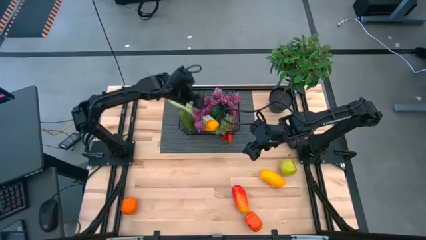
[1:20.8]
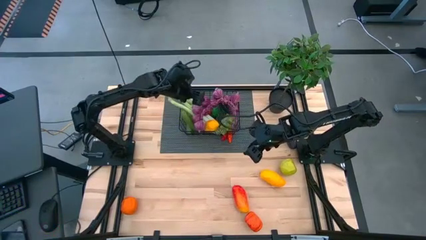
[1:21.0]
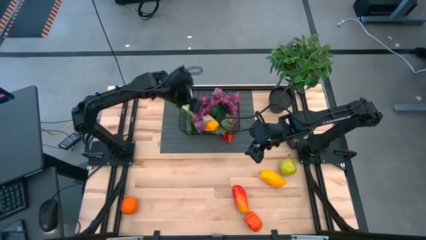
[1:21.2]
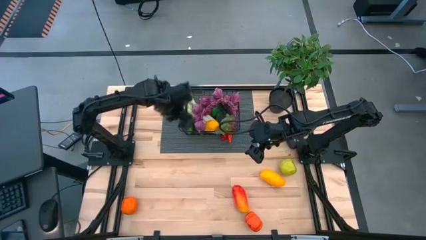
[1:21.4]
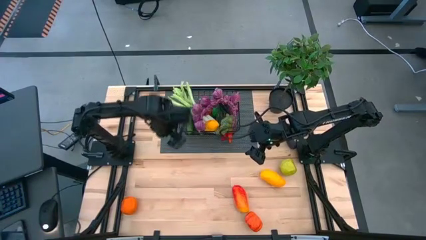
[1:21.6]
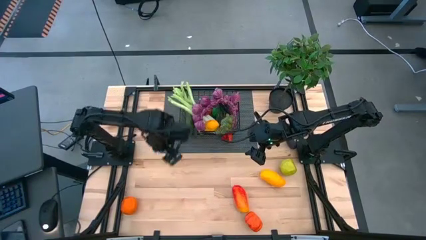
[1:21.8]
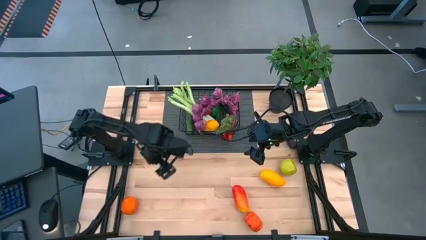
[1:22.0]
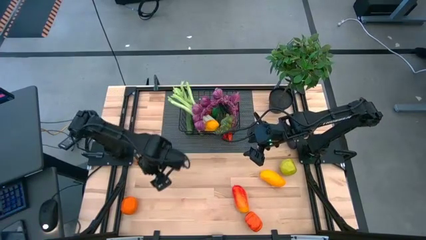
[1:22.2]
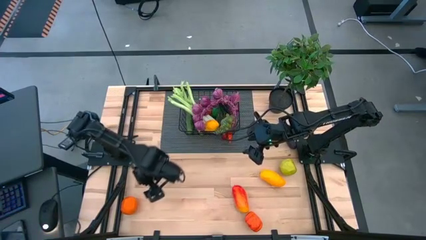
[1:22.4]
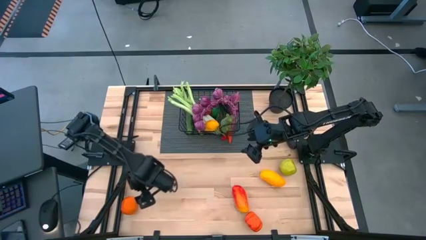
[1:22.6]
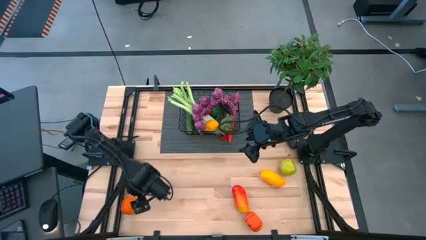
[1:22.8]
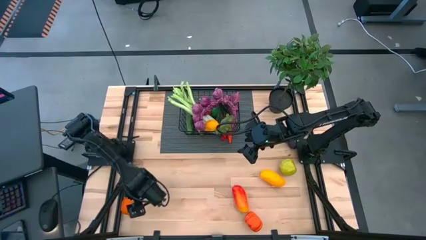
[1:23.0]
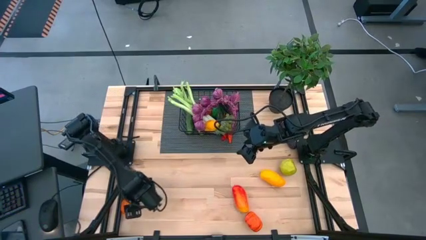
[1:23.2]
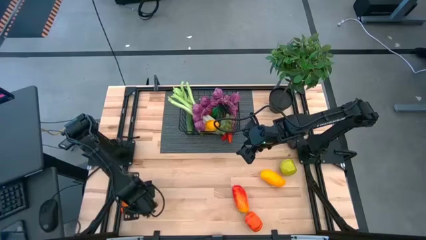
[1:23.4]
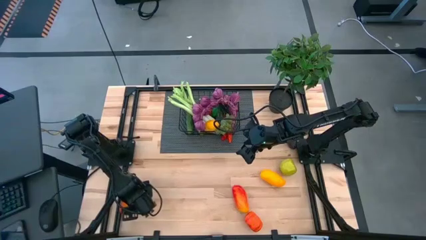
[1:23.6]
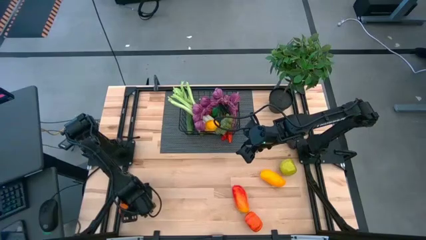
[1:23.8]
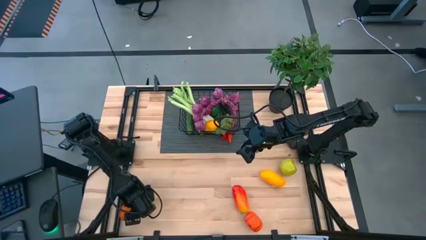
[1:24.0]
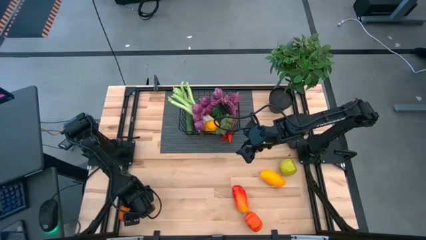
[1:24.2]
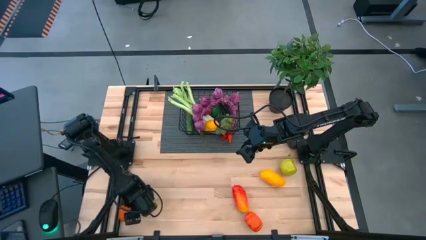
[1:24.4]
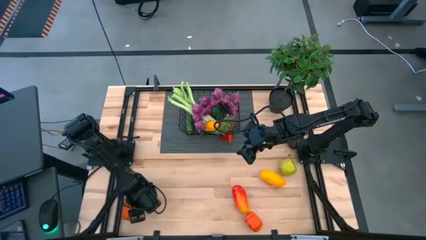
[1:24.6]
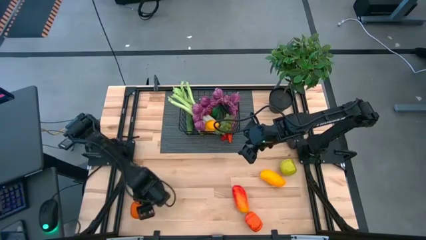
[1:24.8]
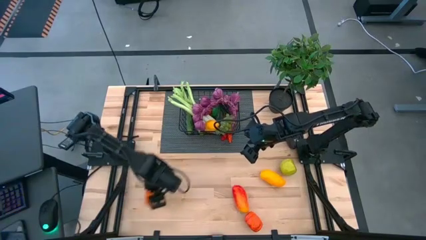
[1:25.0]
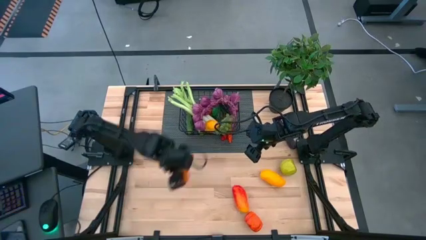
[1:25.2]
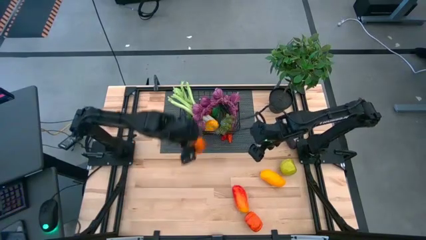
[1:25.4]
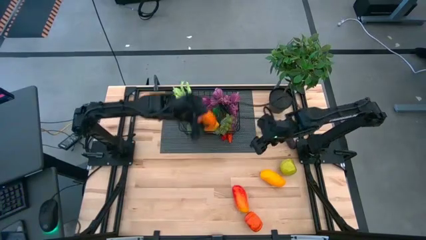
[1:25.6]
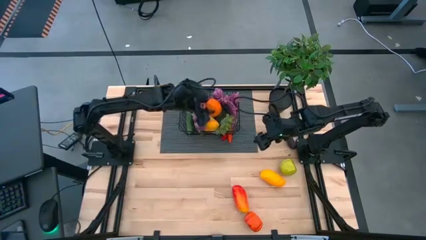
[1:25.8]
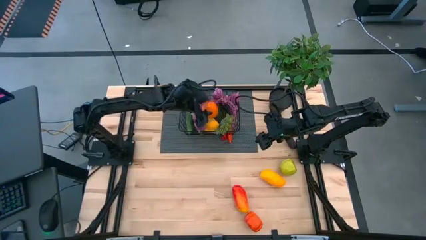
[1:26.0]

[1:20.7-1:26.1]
Task: Build produce basket
Put the orange into the wire basket

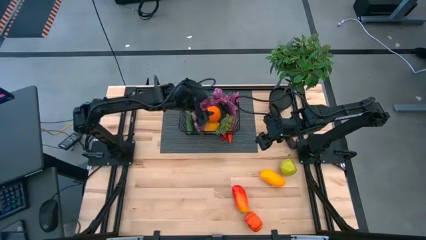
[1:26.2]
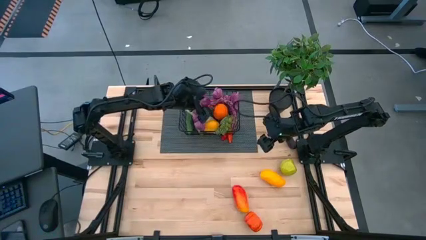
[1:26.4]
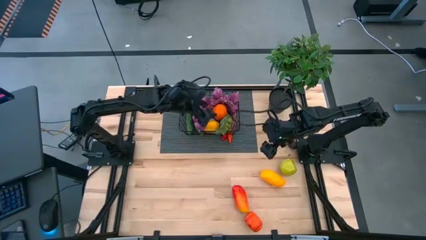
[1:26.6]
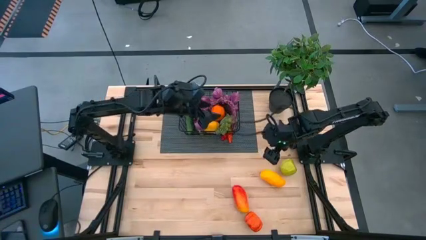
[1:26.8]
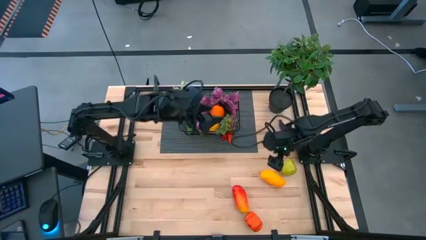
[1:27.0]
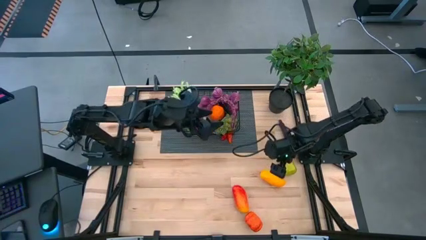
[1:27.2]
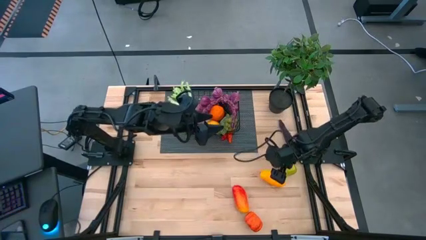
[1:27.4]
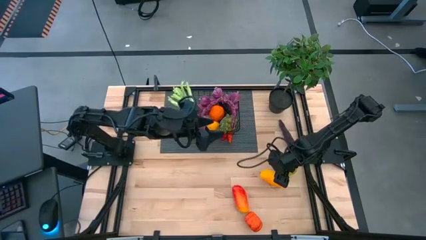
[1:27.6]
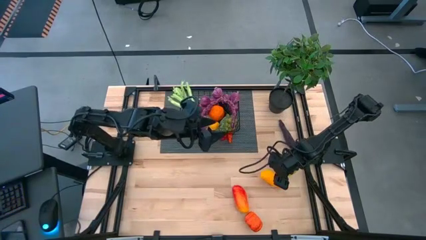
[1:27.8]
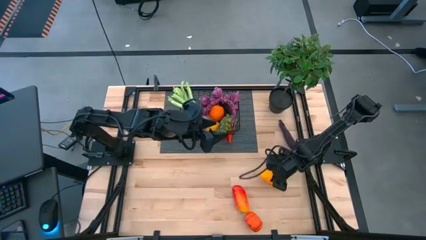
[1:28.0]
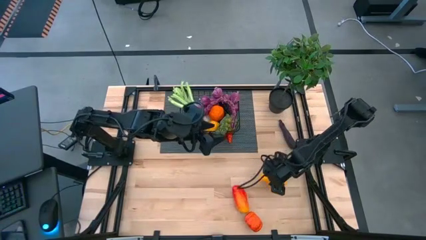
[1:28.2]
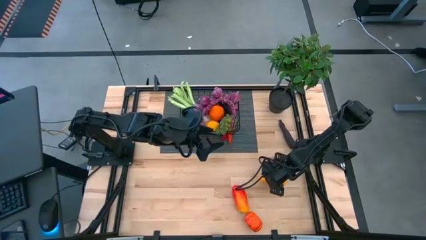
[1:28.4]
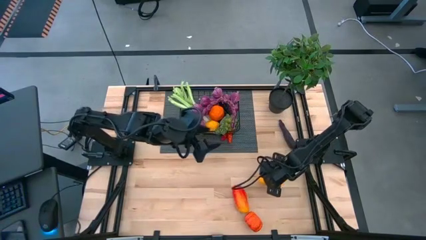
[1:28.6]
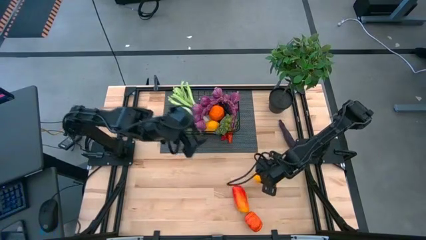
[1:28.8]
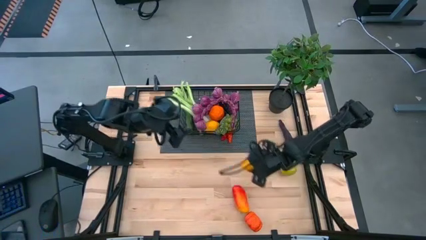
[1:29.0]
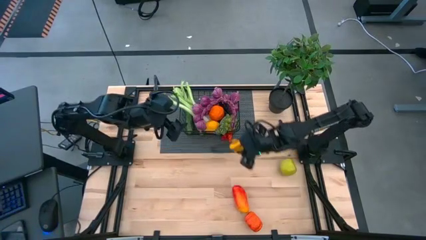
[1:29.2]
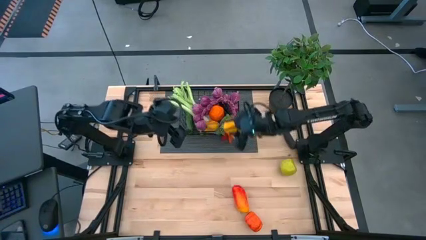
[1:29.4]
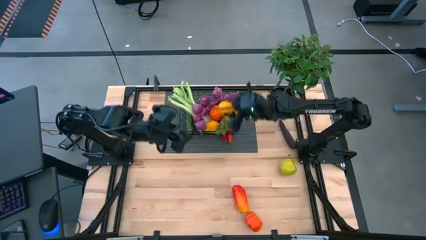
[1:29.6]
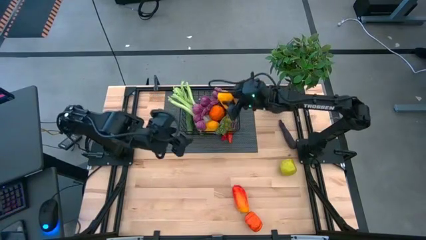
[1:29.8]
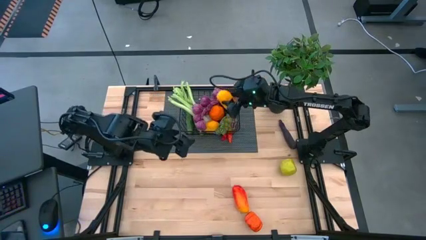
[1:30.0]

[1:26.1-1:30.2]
Put the top mango into the wire basket

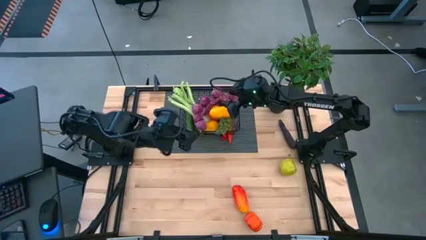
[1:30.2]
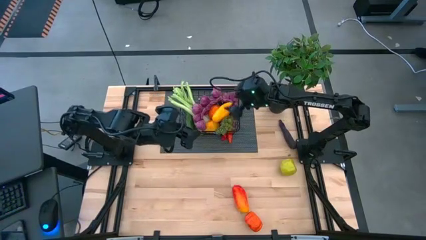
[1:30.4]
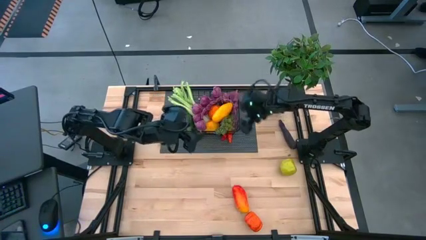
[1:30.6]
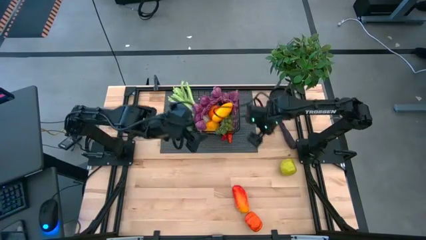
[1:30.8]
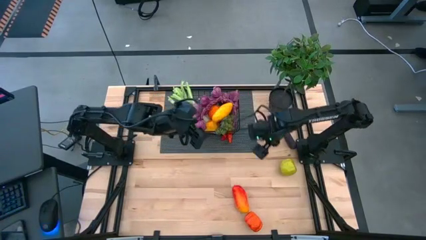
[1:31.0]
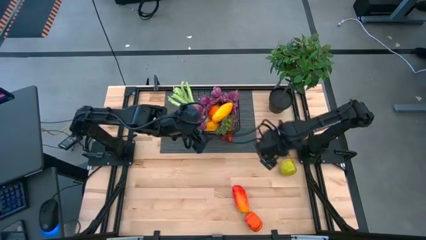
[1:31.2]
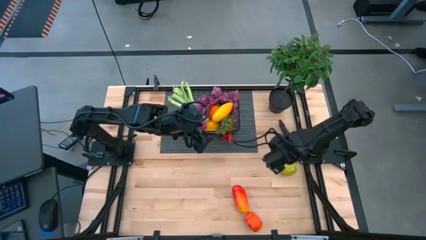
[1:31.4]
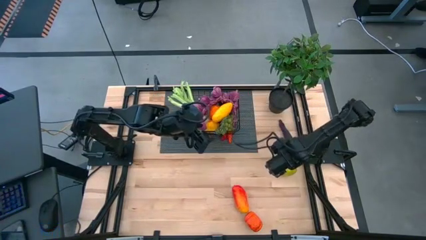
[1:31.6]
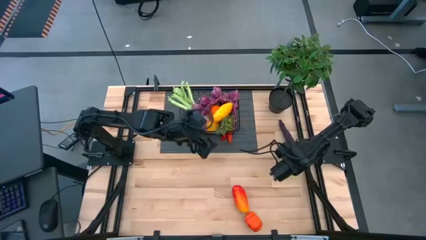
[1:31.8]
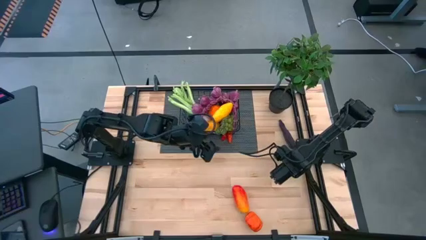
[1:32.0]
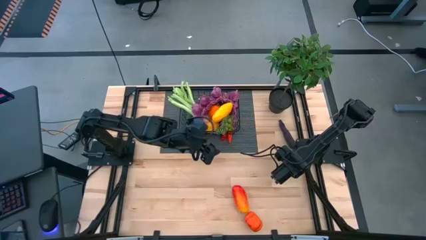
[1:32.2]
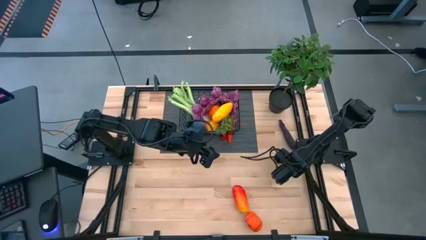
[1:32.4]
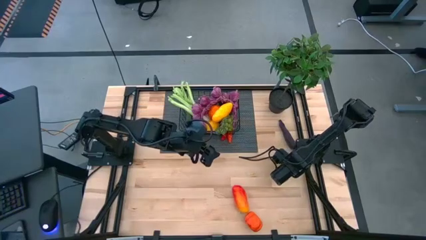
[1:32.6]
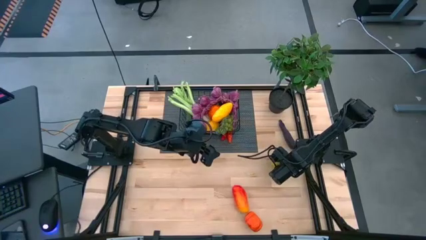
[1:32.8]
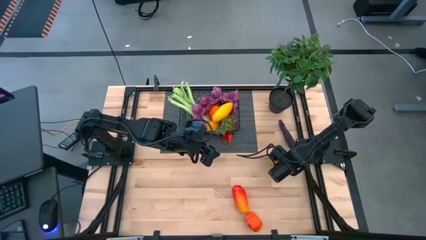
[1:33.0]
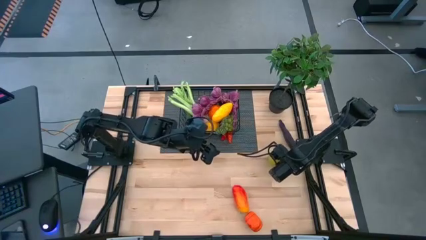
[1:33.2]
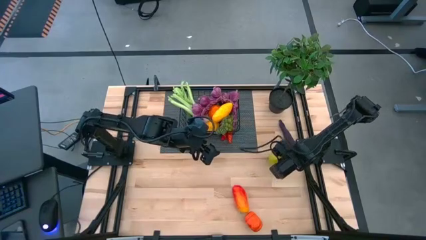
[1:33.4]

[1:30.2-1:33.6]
Put the apple into the wire basket

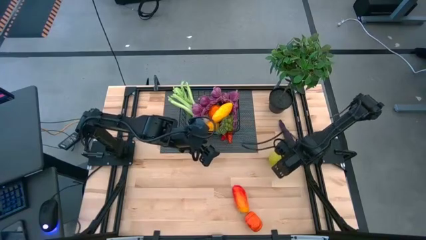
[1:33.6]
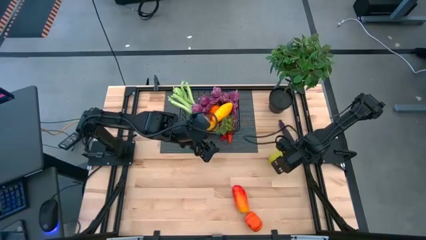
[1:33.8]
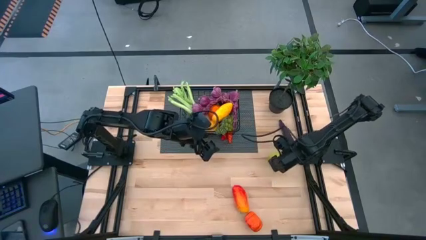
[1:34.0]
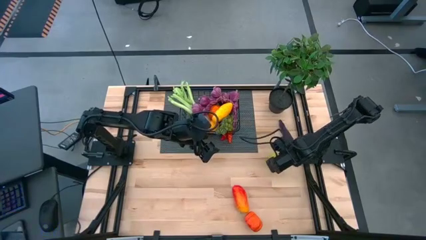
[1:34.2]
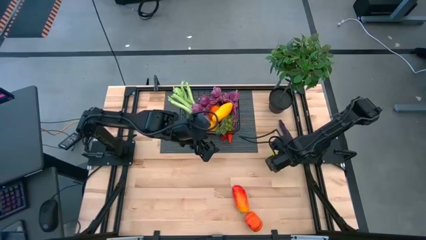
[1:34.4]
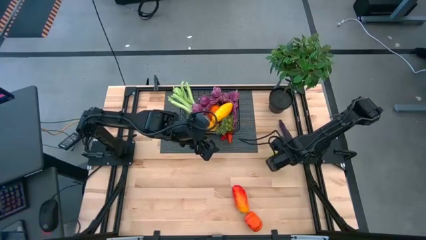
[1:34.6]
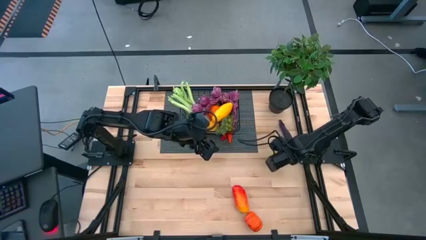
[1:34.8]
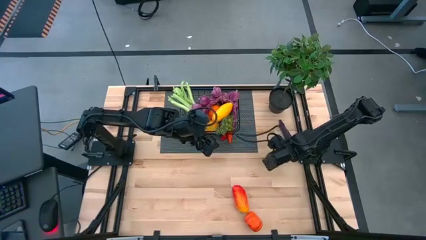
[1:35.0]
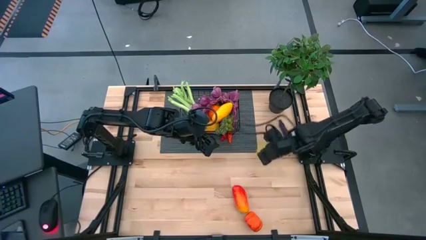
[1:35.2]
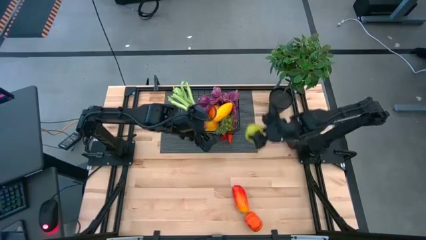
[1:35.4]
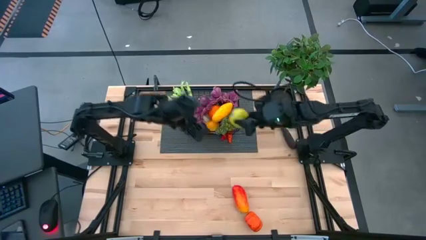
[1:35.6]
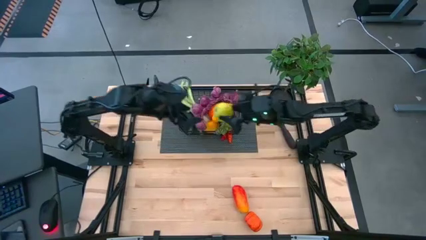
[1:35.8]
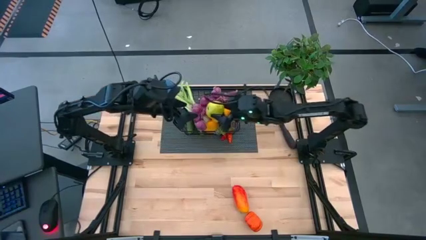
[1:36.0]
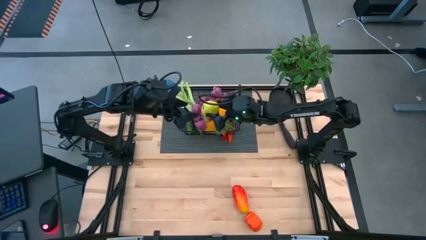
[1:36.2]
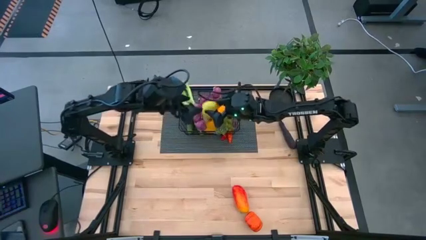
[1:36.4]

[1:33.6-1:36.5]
Put the apple into the wire basket

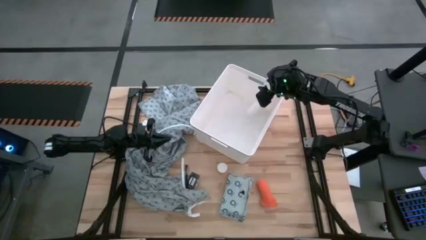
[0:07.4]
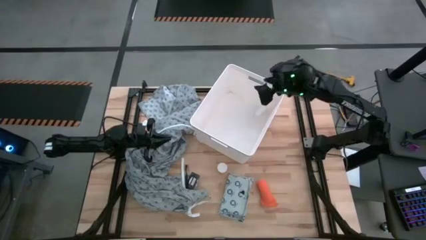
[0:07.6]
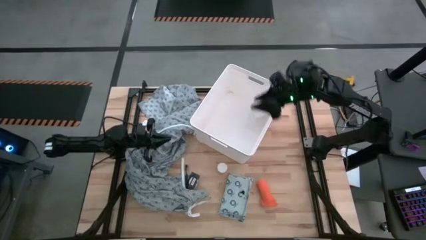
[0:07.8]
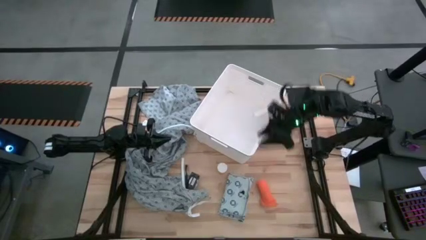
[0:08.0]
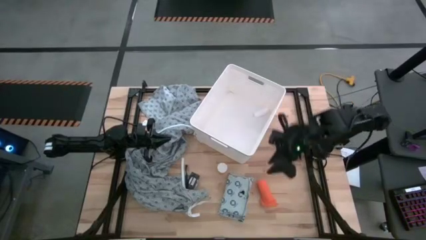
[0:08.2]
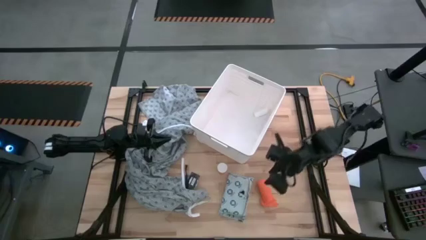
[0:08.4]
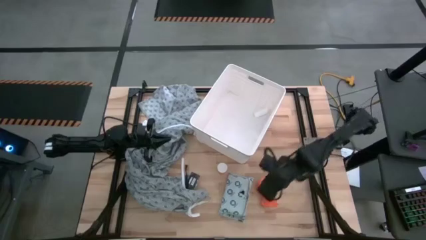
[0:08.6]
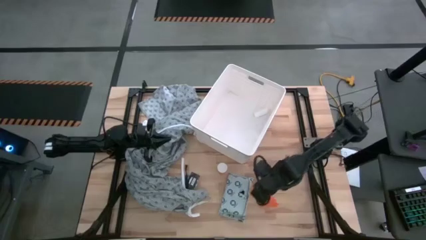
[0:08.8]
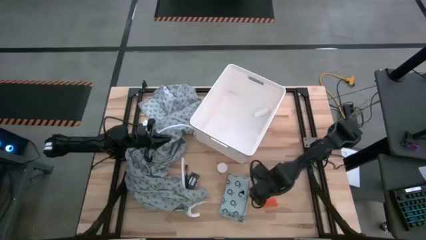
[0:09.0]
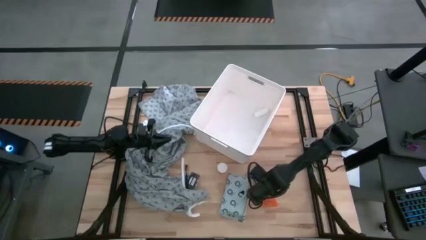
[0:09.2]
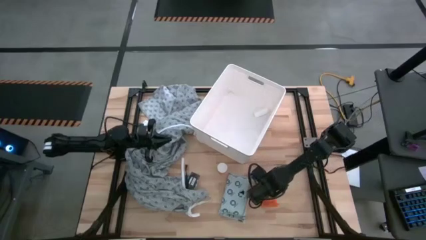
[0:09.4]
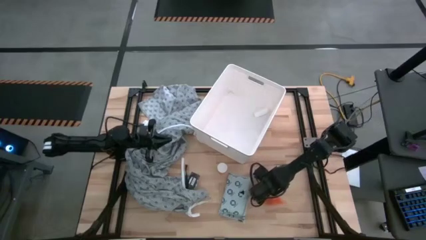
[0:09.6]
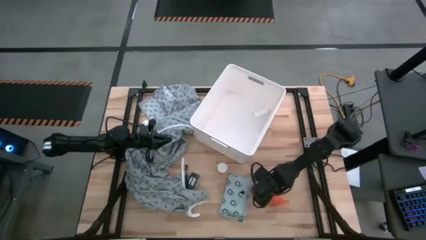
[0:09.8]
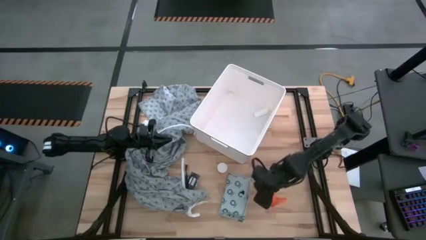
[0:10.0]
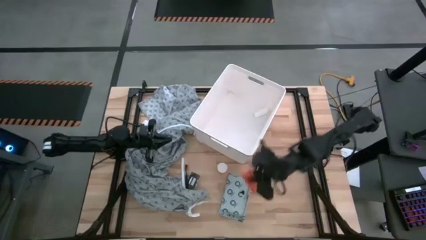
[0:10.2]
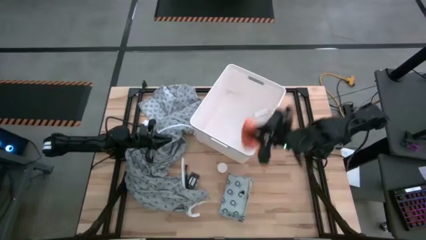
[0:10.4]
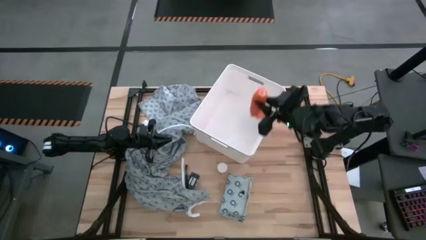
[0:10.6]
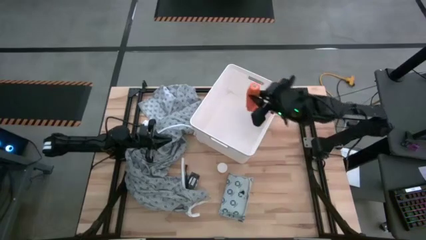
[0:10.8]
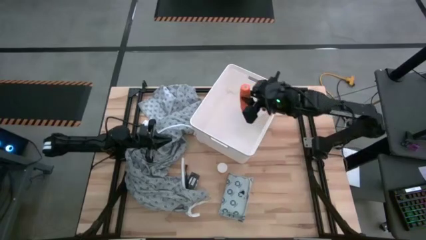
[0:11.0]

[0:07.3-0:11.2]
Task: Pick & place medical supplies in basket/bin
Put the orange bandage into the white bin
